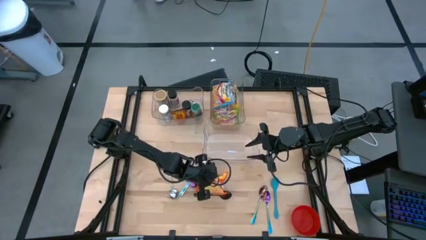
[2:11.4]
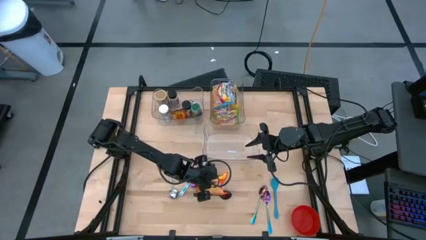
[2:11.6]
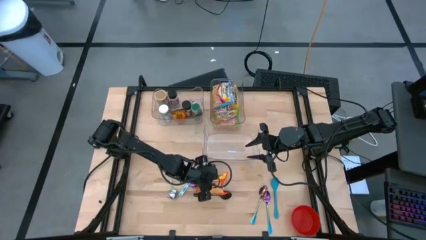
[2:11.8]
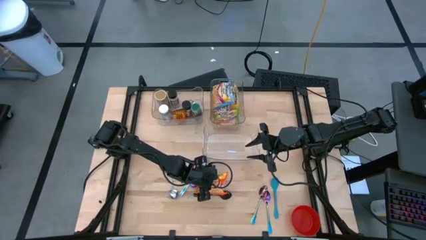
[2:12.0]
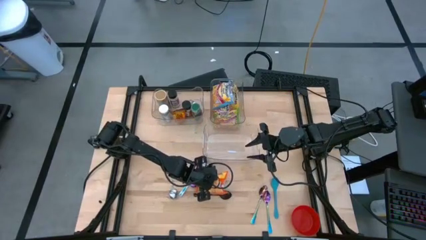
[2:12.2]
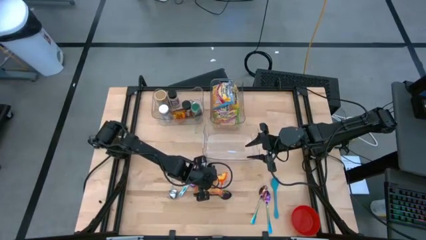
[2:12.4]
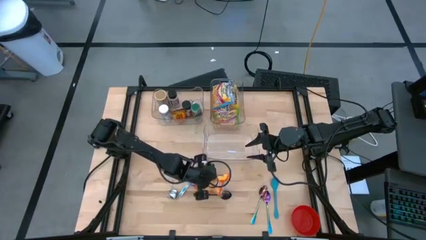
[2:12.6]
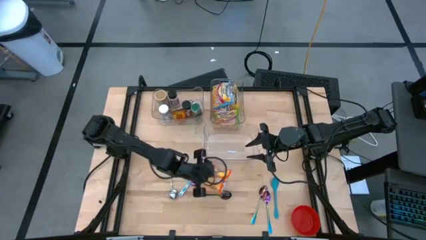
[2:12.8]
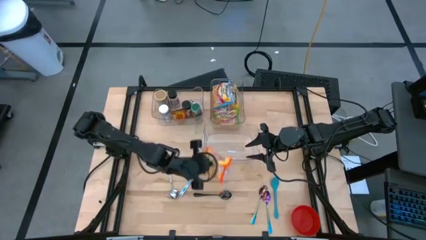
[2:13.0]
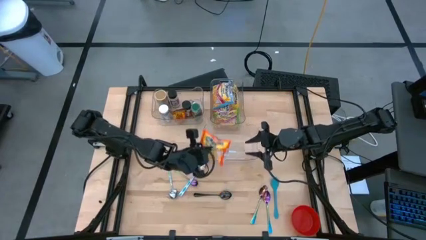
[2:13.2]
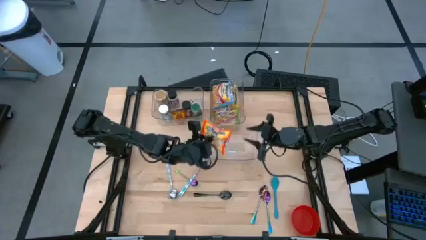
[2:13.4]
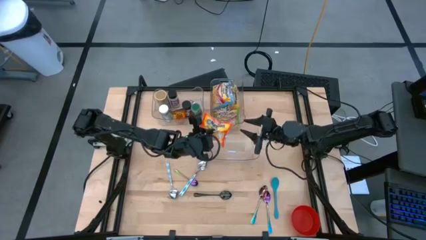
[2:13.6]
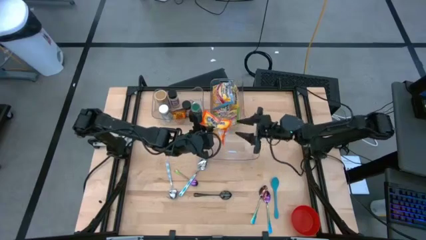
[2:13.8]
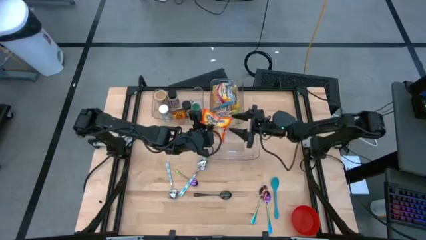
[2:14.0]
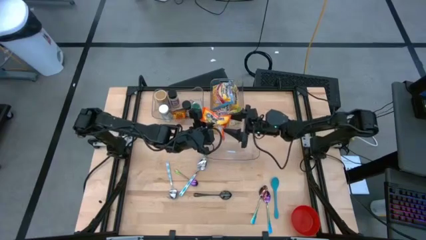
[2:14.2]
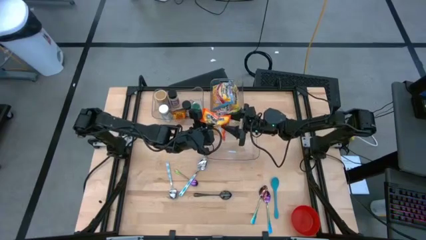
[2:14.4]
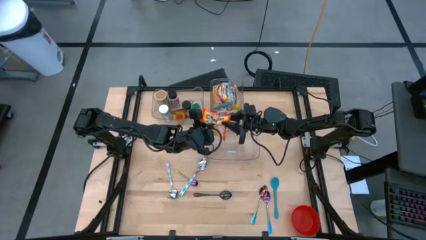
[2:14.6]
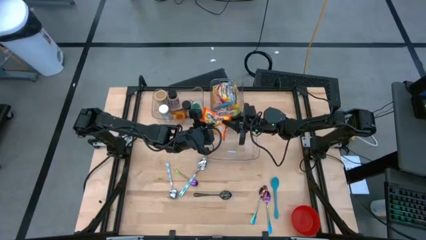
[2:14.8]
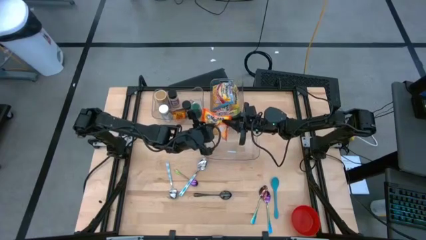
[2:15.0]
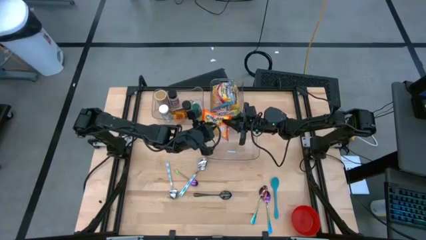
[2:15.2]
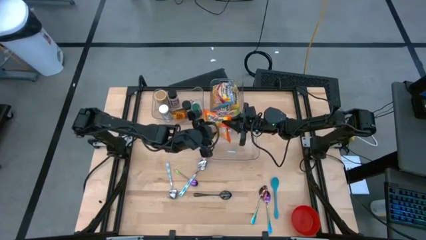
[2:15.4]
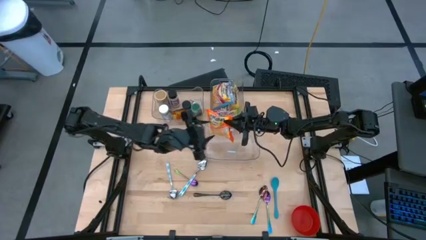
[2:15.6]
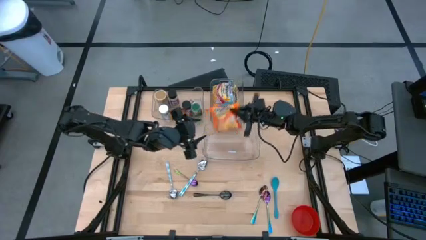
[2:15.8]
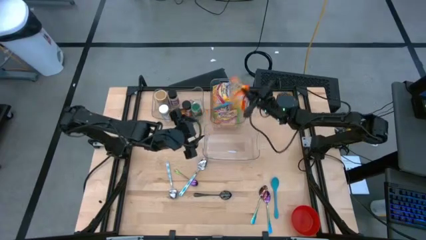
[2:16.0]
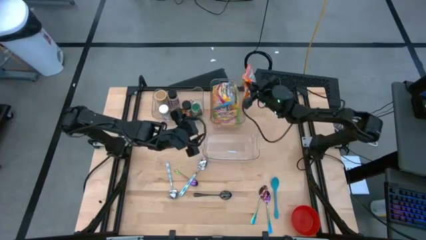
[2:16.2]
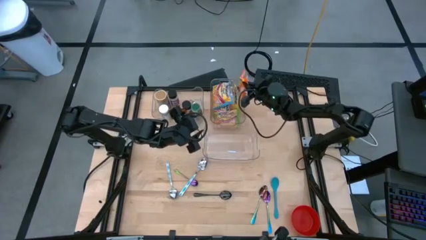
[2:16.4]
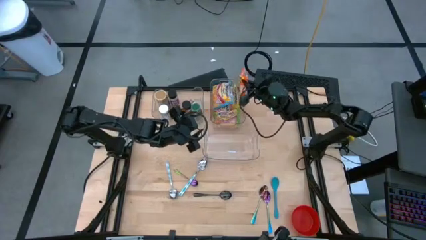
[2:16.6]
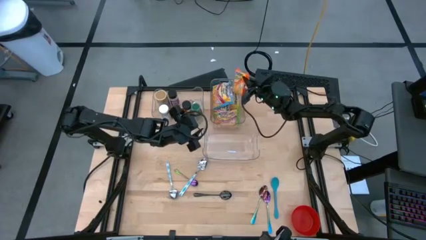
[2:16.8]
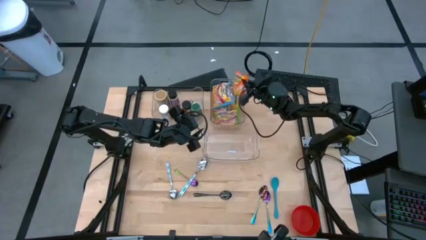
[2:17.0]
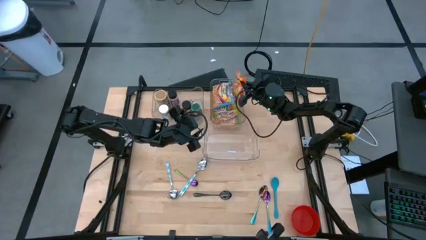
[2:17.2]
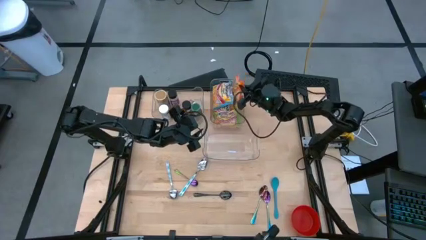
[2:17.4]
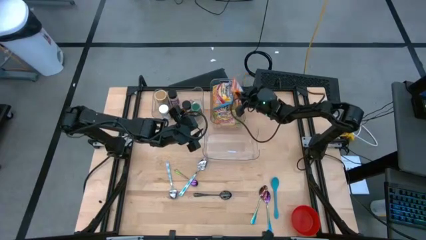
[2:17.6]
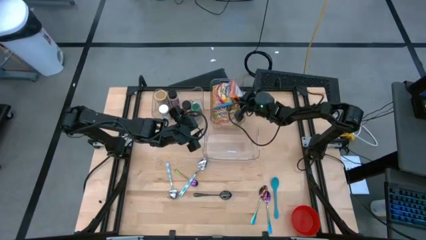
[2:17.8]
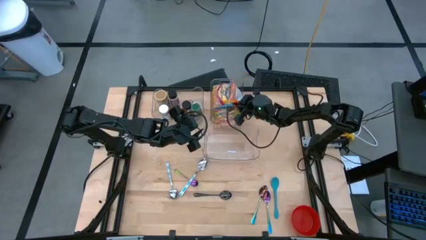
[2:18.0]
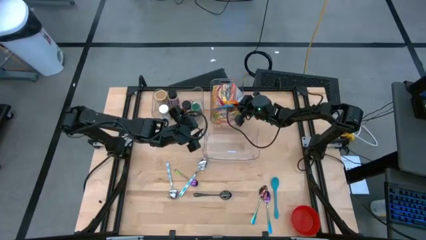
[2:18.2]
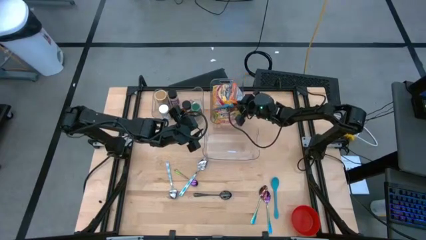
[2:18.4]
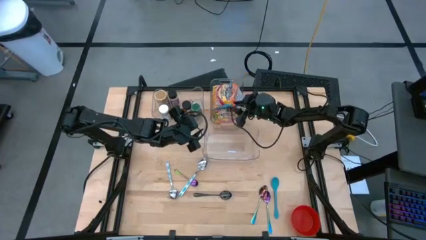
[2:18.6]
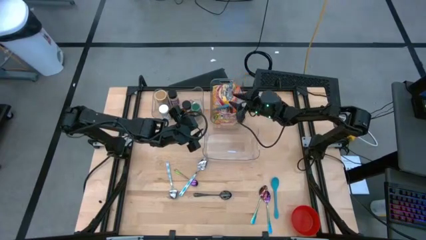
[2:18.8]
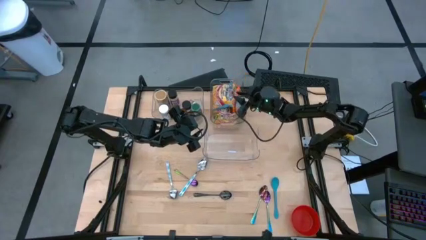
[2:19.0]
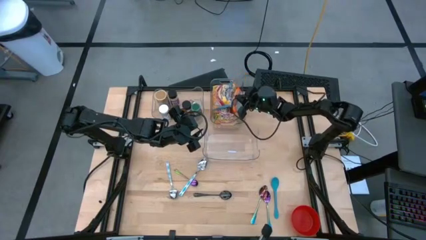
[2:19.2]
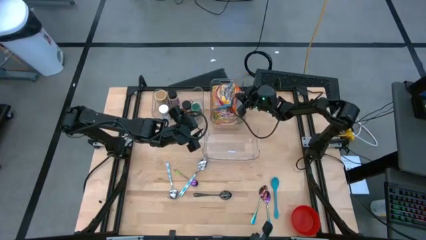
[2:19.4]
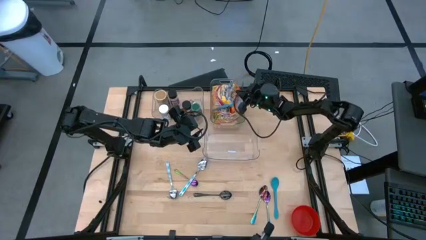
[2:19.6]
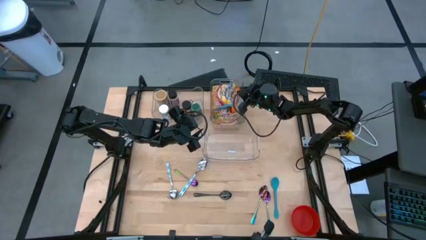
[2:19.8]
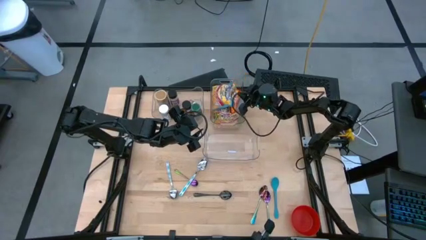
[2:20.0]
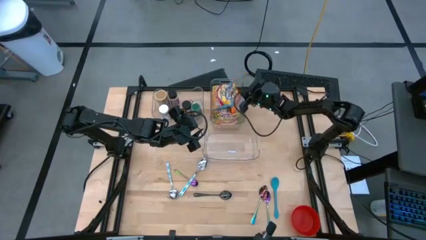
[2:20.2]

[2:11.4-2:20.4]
Task: Pick & Place Food Item
Put the orange noodle pack into the top transparent container

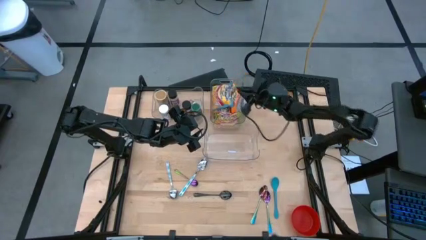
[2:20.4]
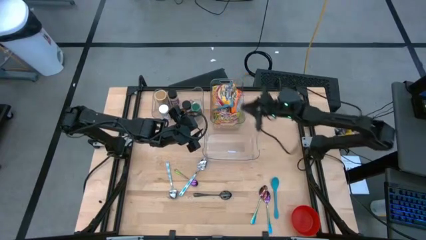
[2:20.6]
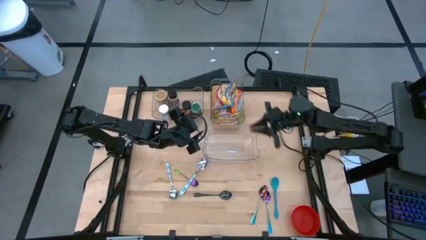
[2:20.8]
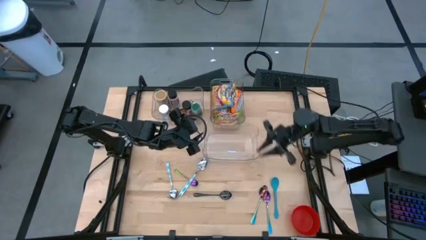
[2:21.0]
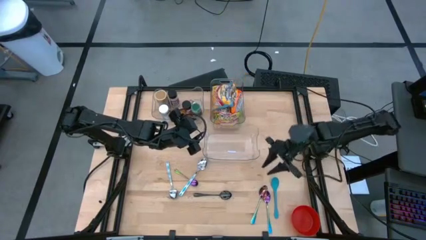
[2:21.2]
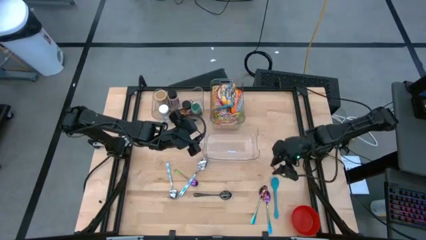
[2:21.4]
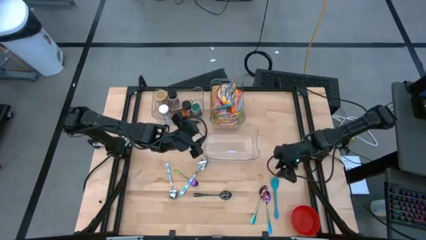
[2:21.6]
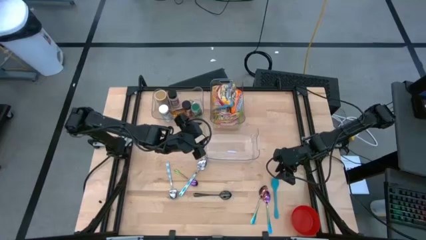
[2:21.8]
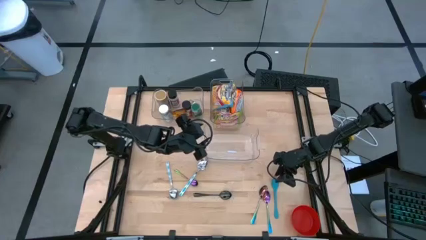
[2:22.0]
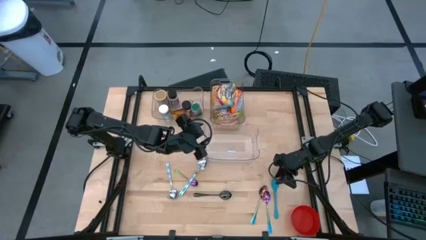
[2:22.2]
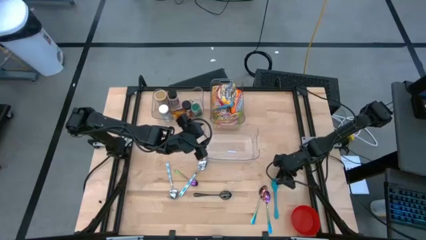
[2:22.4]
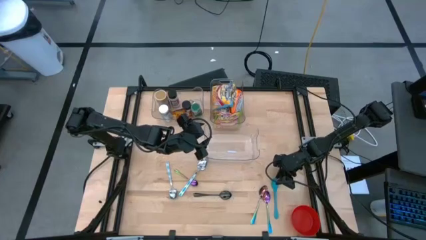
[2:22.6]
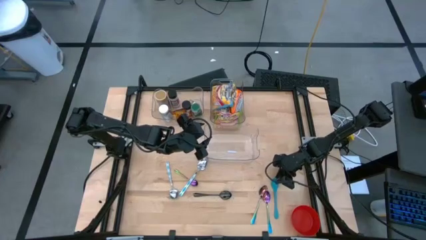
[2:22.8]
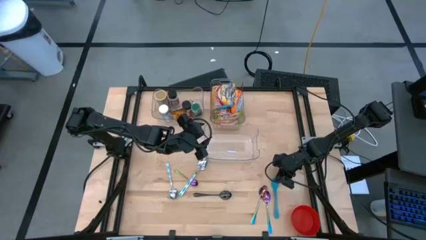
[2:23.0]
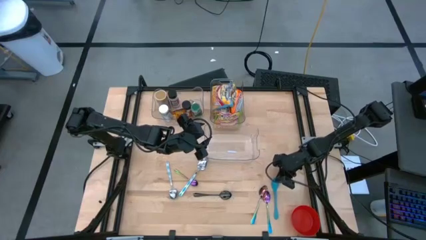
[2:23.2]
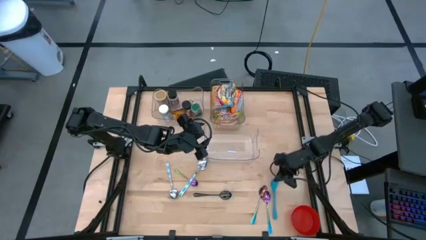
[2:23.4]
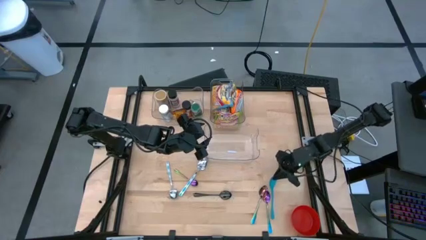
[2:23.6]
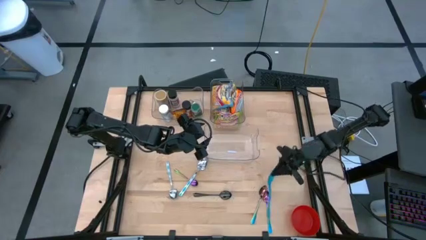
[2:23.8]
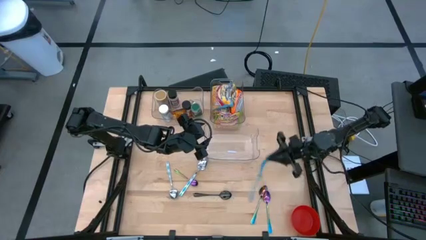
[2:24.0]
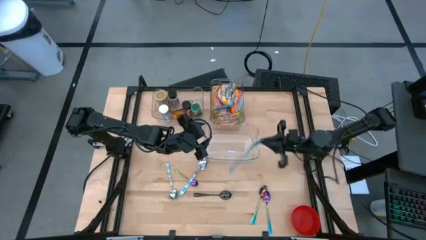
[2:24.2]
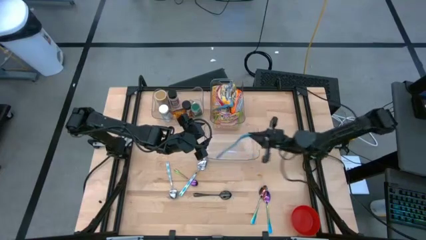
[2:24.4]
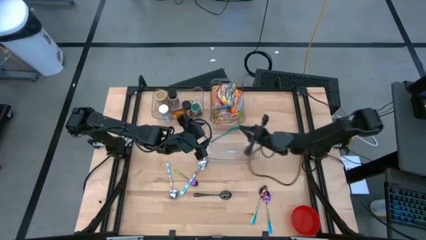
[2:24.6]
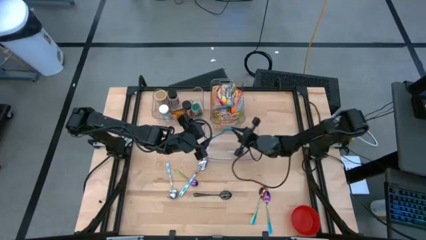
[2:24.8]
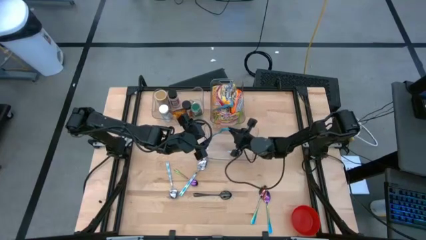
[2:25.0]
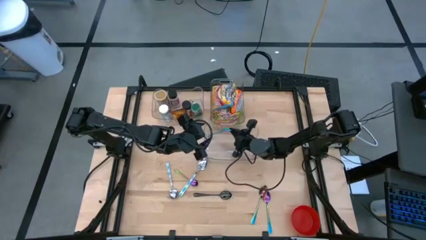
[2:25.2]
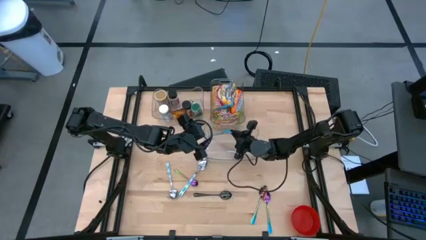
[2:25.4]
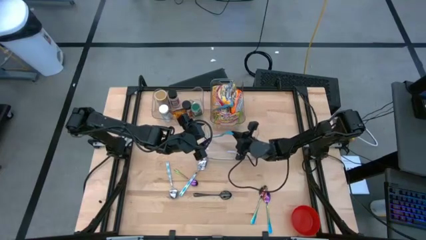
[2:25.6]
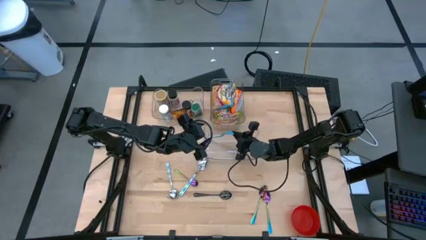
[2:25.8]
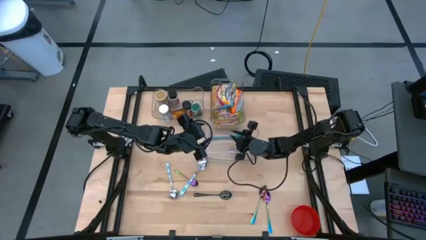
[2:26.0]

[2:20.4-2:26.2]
Put the blue spoon into the bottom transparent container
